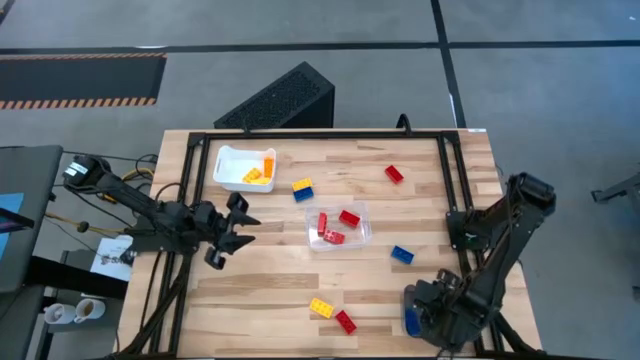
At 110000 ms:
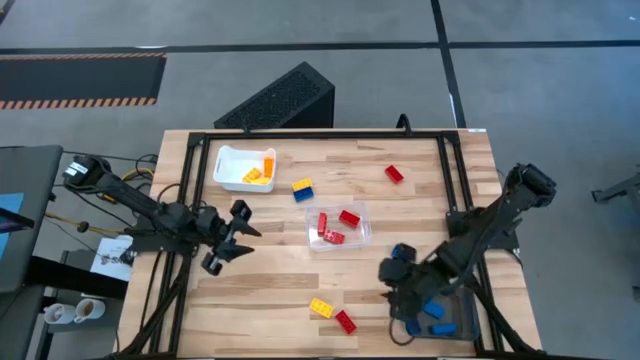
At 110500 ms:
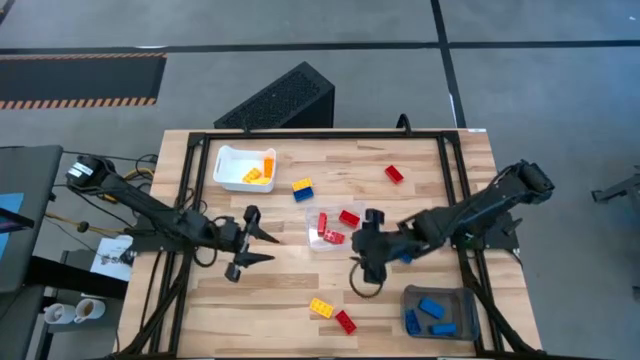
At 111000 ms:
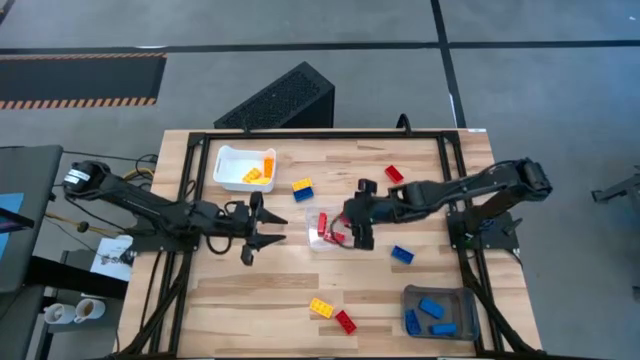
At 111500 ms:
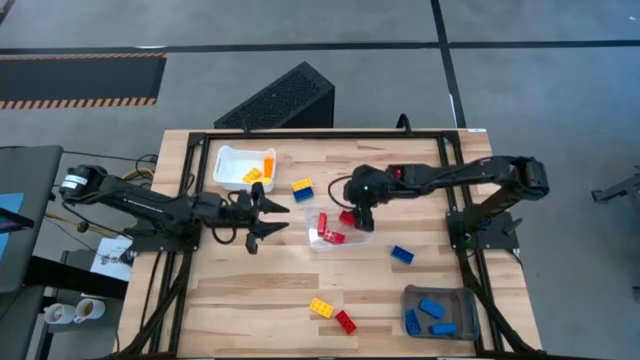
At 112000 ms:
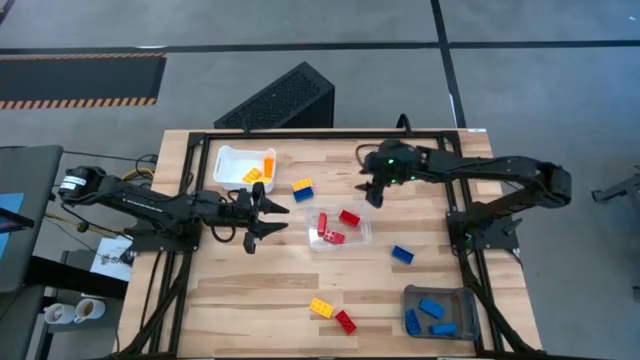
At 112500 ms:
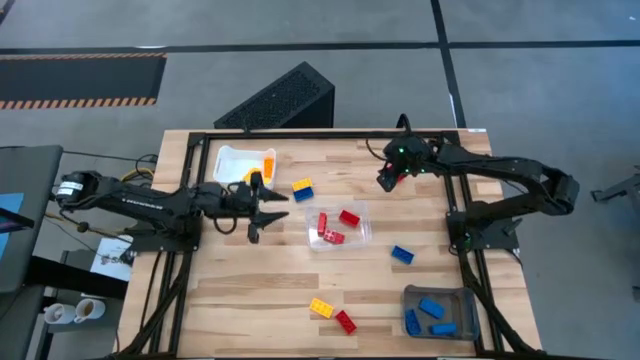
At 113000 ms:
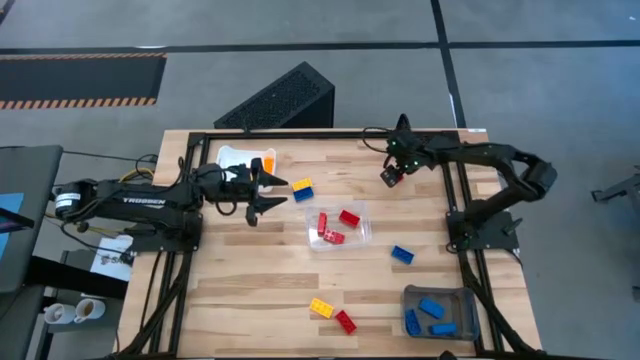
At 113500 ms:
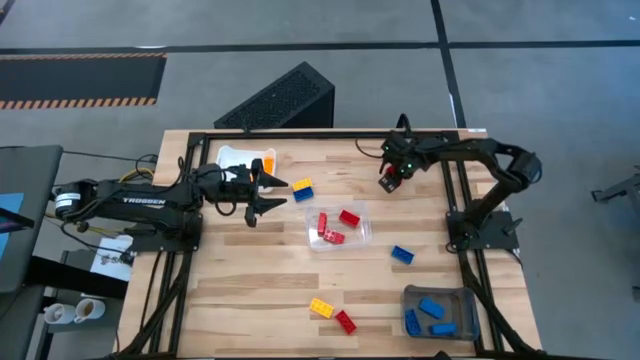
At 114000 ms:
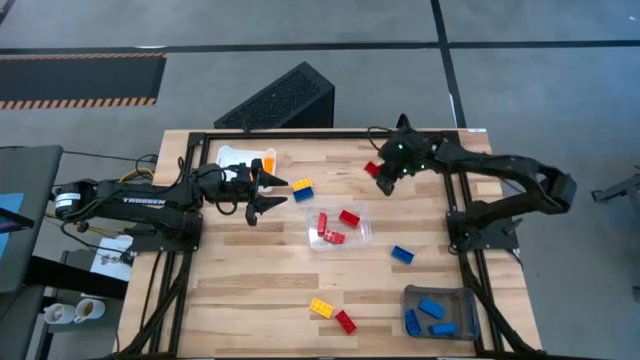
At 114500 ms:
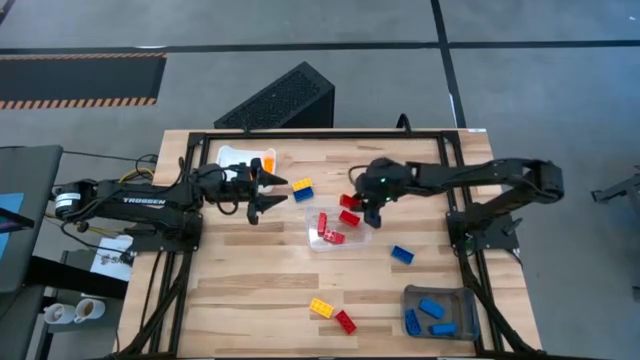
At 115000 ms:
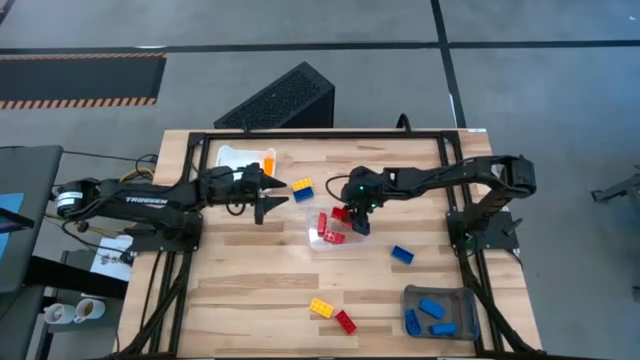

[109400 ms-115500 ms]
Task: Sort & place blocks by color
Put the red game piece into the transparent bin

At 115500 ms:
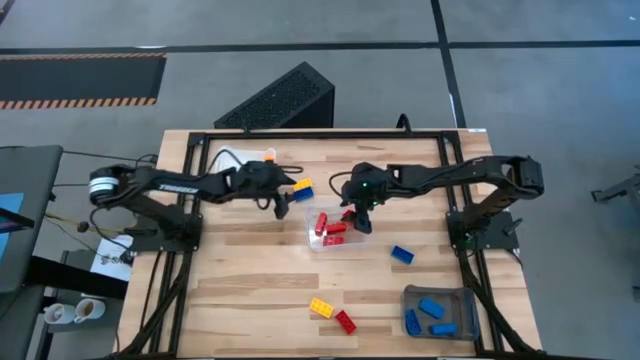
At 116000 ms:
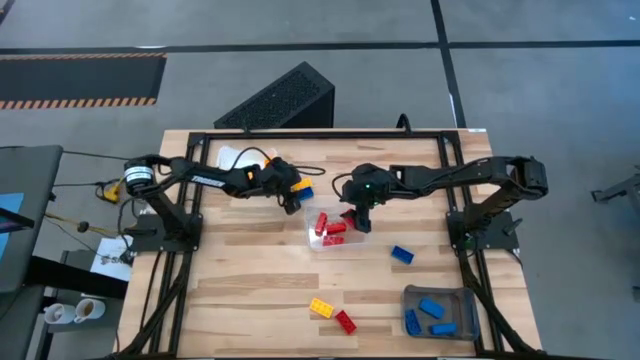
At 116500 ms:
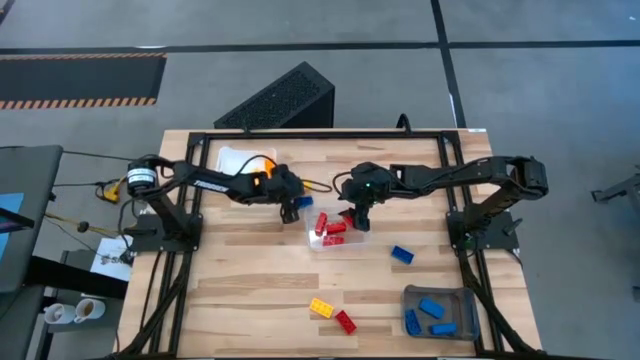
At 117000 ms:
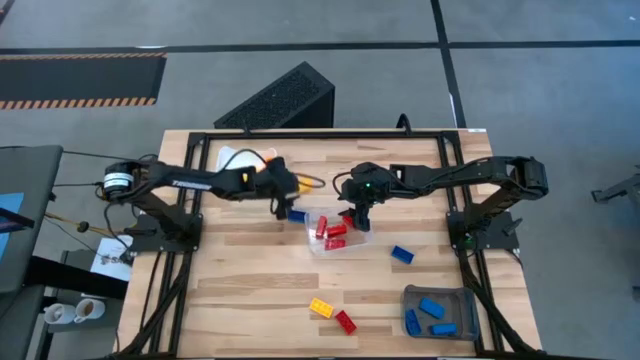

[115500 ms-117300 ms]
Adjust the blue game piece

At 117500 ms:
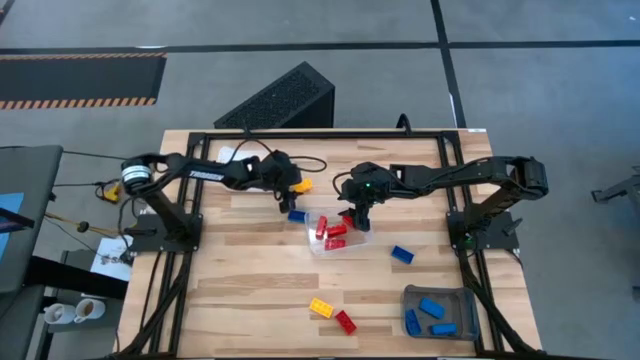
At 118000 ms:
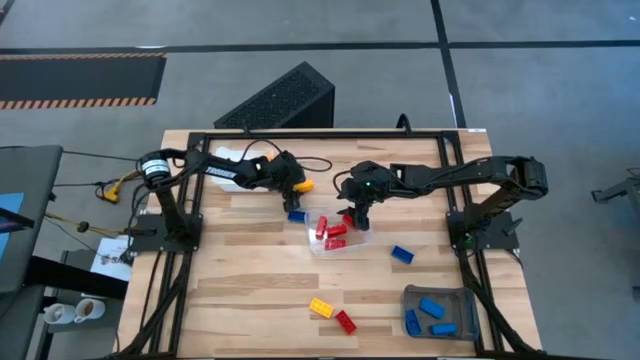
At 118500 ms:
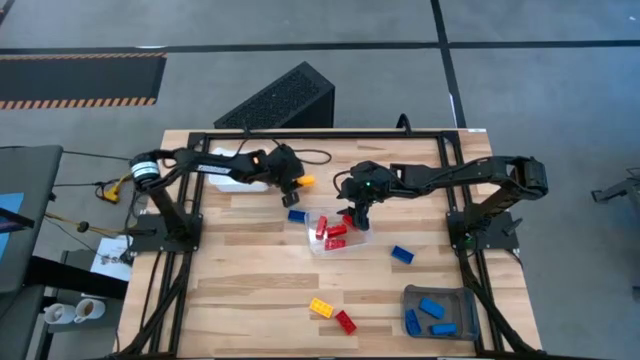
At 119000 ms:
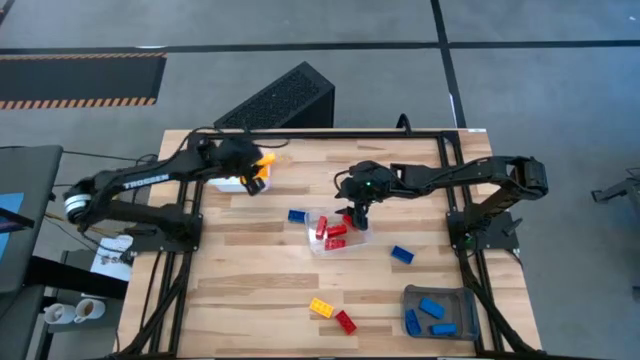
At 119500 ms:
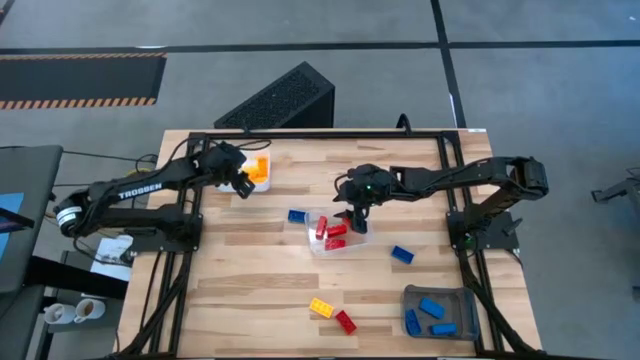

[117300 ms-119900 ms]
Put the yellow game piece into the white bin

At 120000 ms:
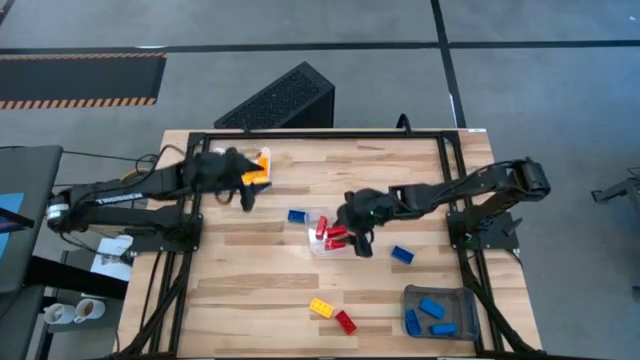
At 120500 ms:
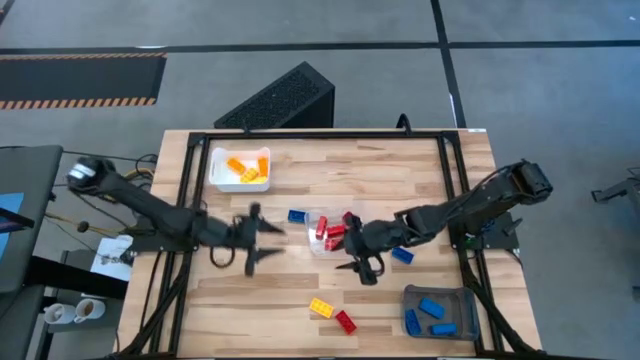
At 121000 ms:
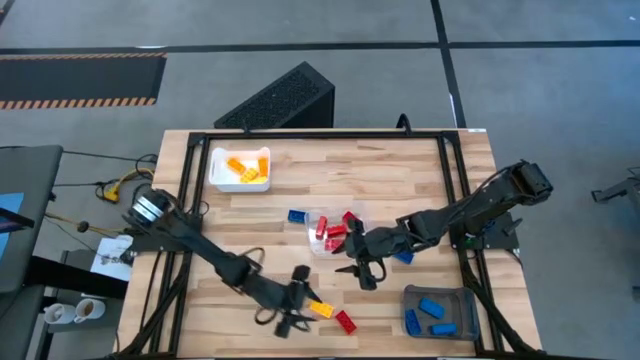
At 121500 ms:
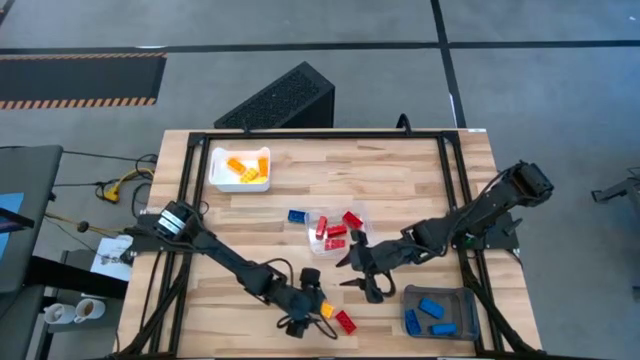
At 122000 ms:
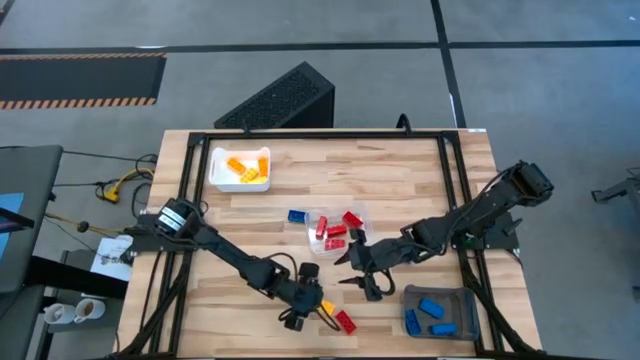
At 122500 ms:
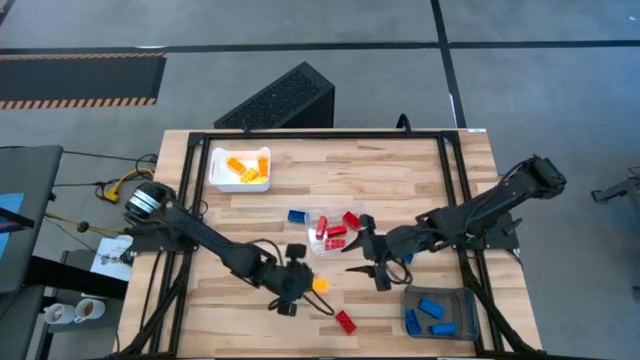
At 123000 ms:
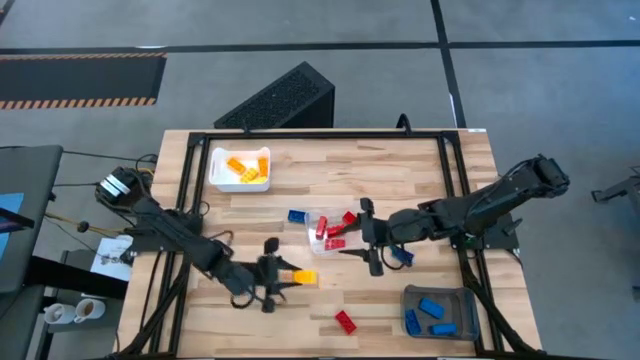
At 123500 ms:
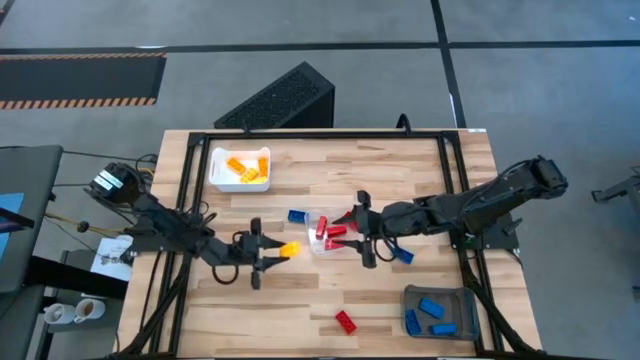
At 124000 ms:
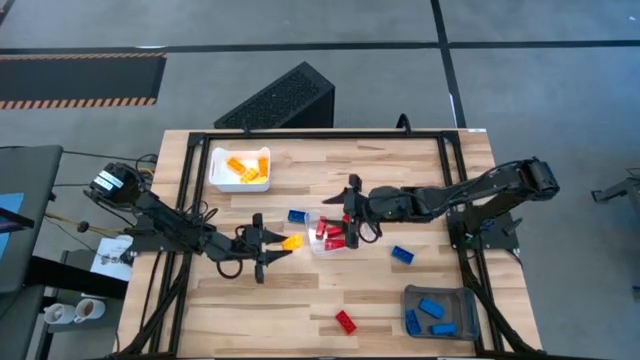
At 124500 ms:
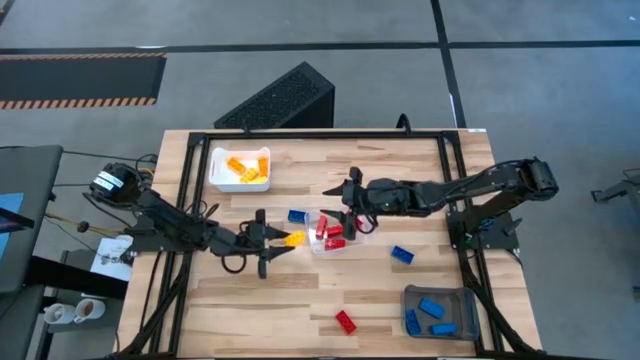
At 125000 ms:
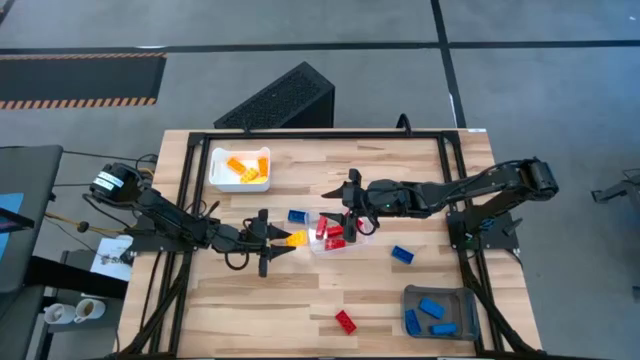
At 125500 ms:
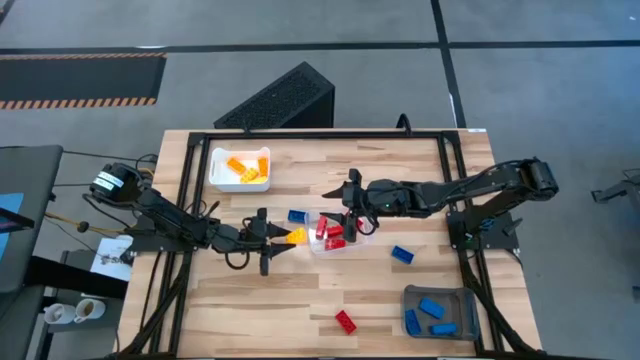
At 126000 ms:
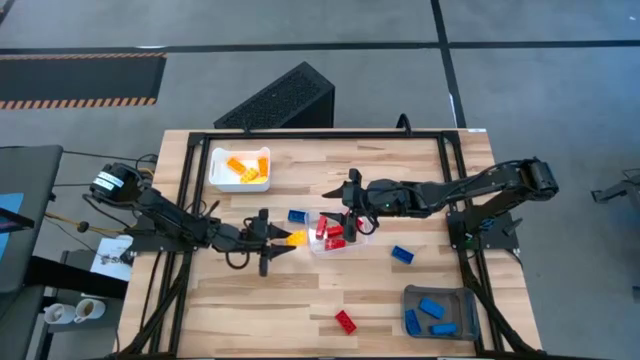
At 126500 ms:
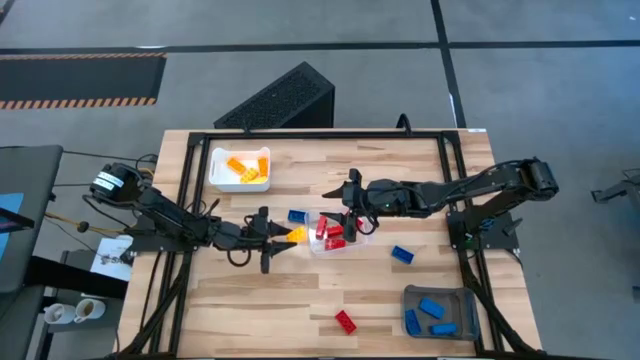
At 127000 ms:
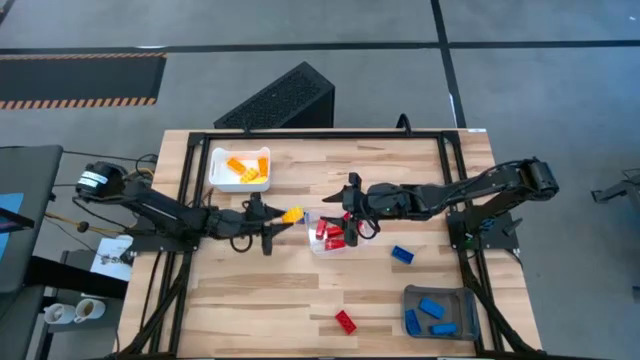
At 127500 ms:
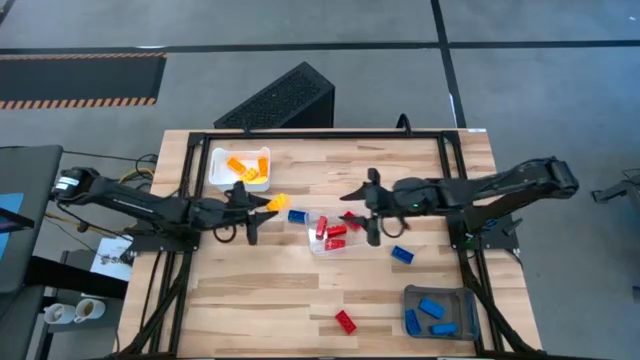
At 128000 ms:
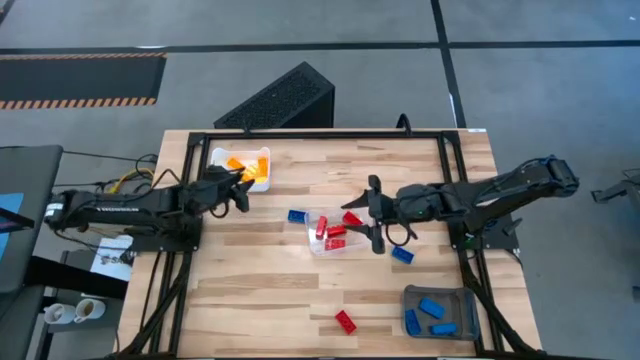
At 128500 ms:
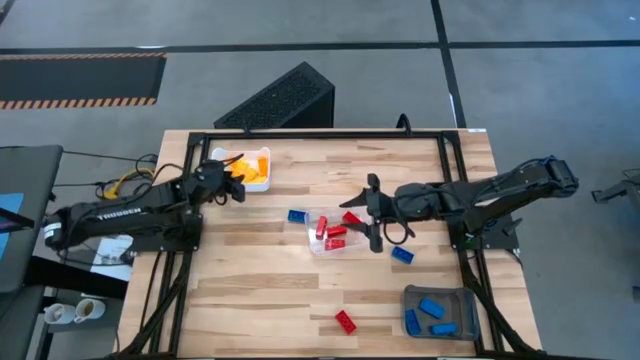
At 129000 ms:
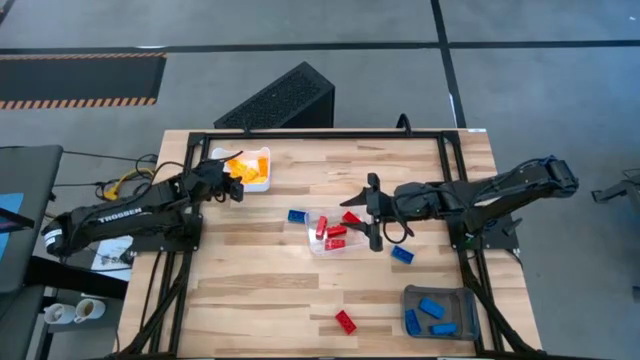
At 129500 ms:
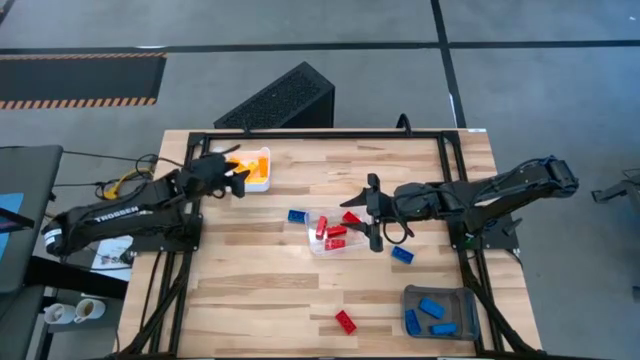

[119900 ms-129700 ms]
Put the yellow game piece into the white bin
